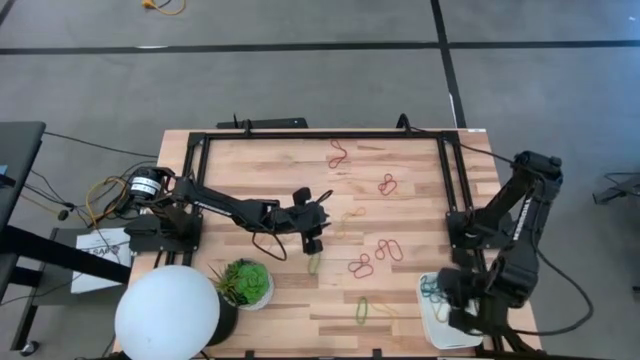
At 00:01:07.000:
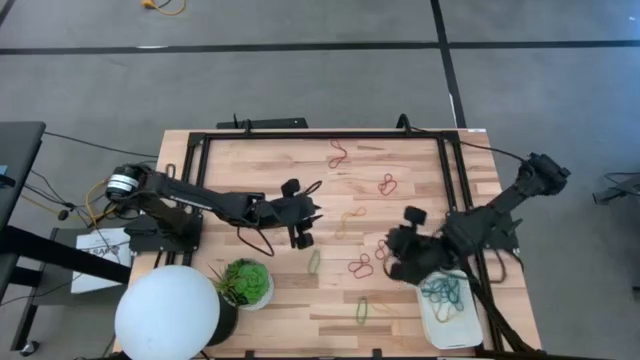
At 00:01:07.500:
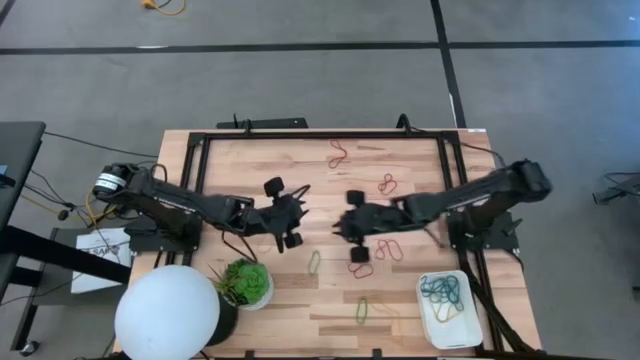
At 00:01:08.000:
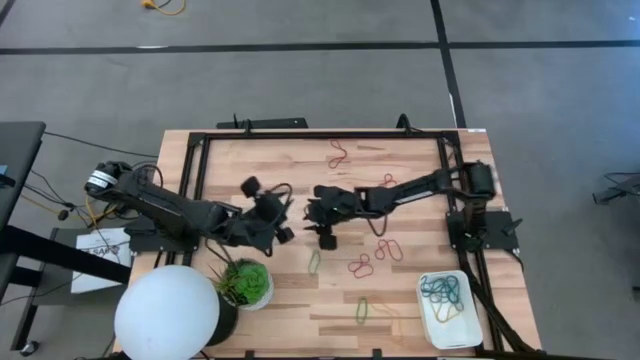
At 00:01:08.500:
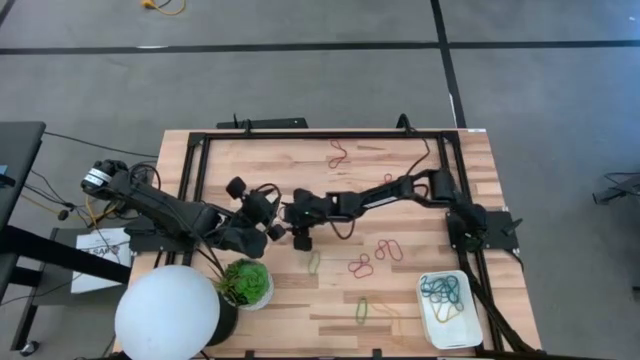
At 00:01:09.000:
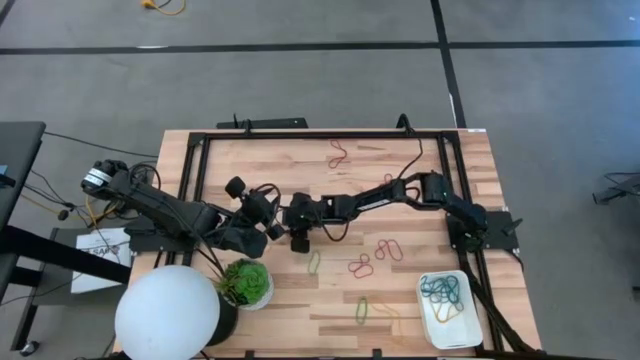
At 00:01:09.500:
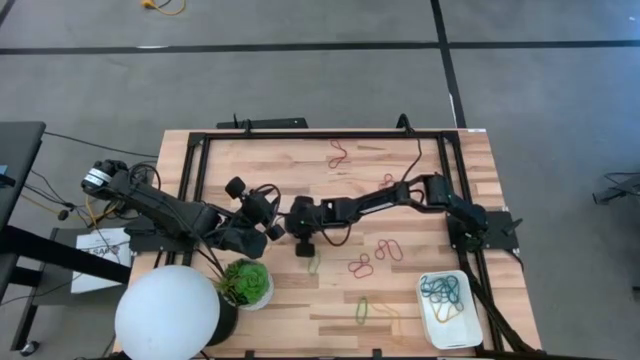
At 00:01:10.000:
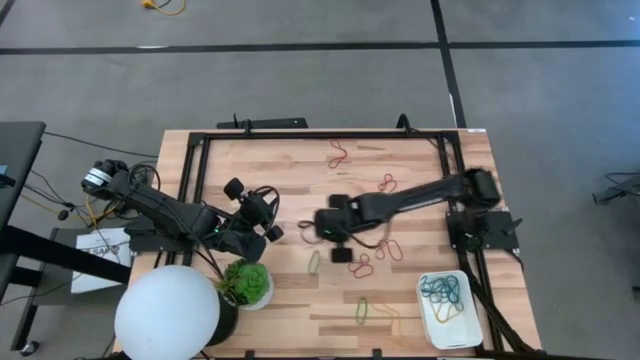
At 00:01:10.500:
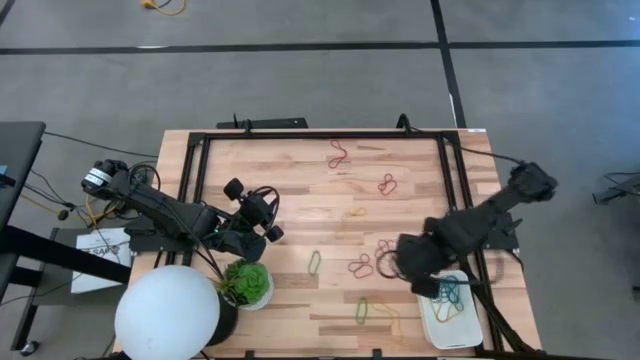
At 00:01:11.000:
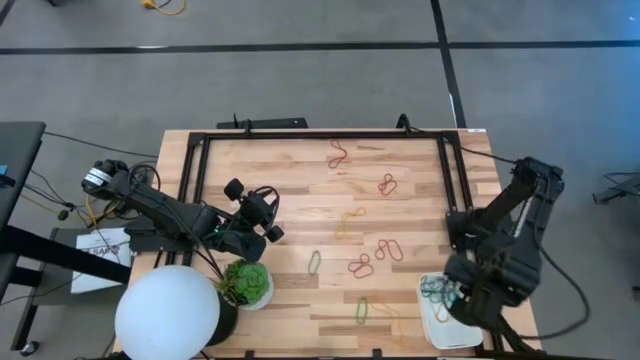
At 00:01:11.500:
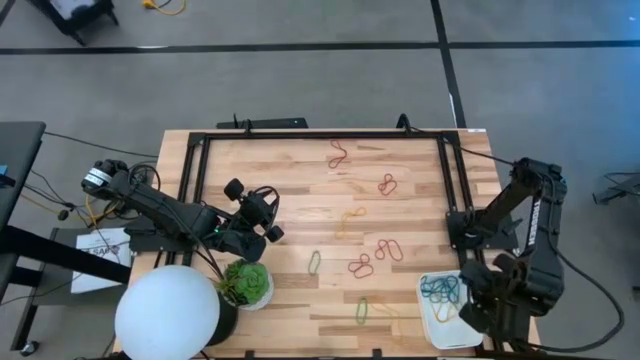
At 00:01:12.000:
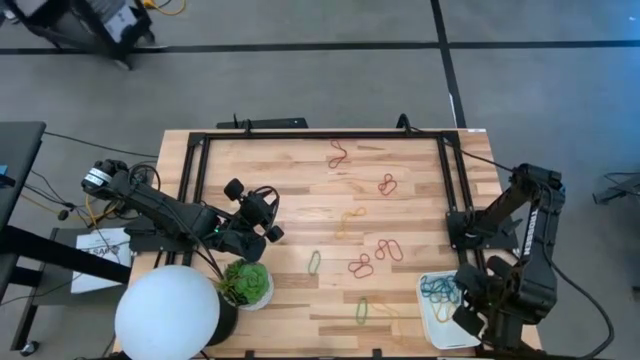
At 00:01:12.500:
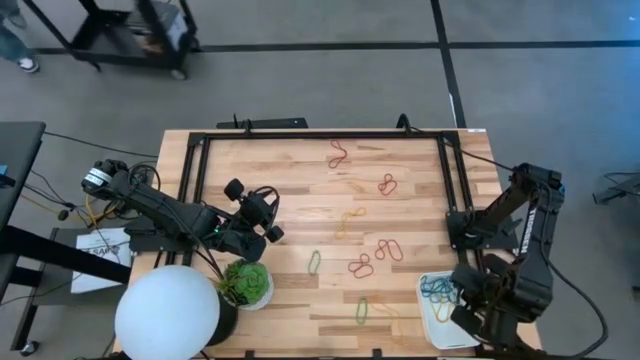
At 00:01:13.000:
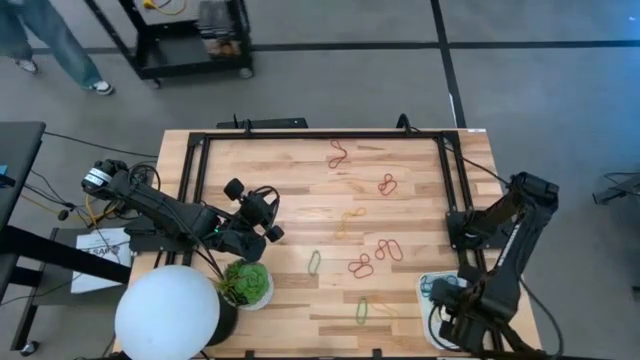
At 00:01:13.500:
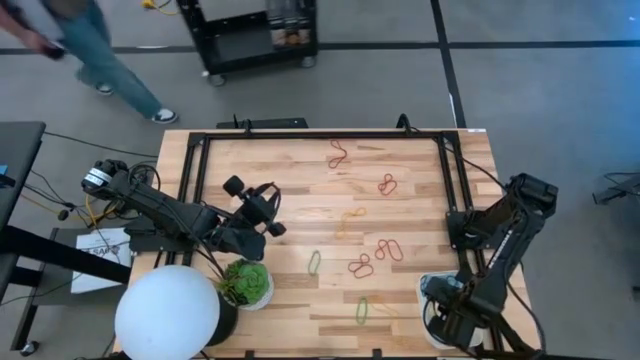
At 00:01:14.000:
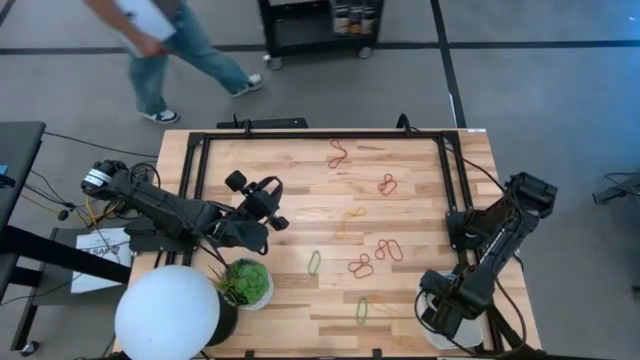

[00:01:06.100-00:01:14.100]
Task: Pick and place items into bin
Put the yellow rubber band into the white bin

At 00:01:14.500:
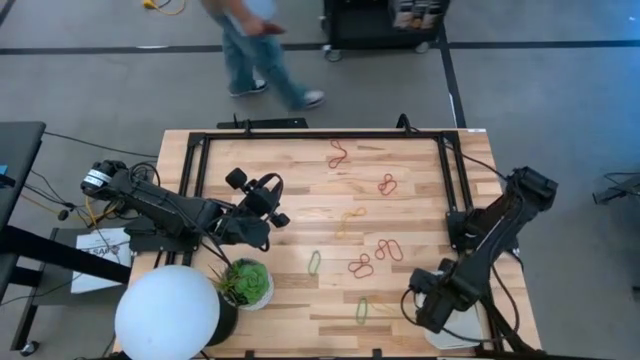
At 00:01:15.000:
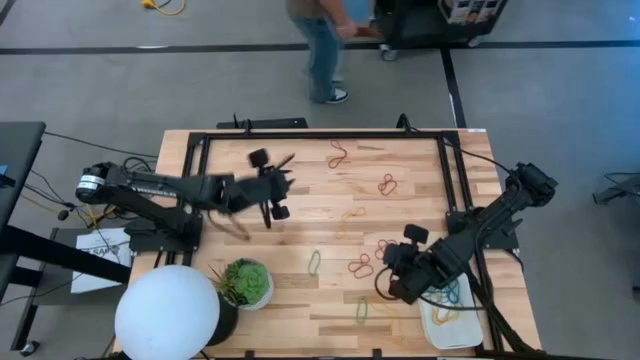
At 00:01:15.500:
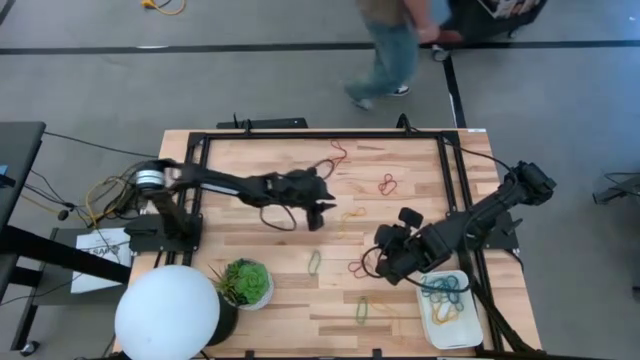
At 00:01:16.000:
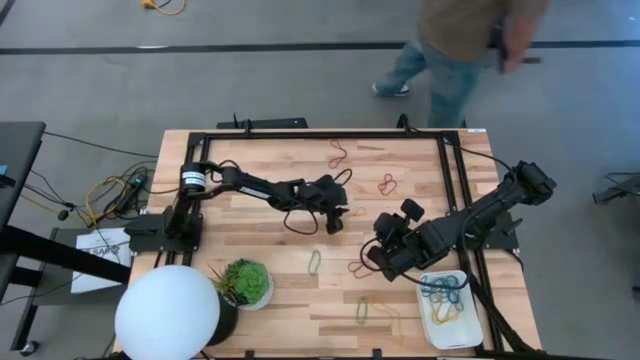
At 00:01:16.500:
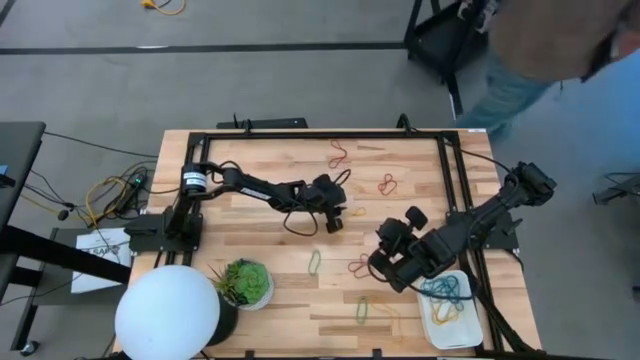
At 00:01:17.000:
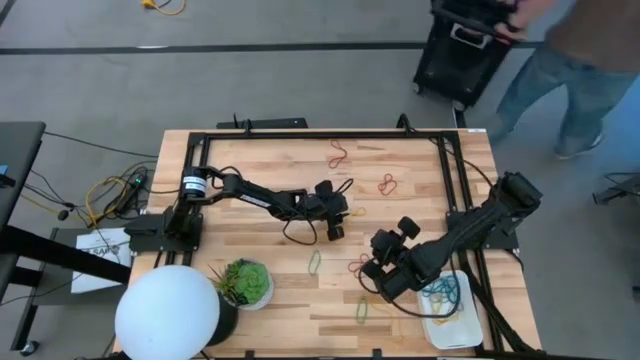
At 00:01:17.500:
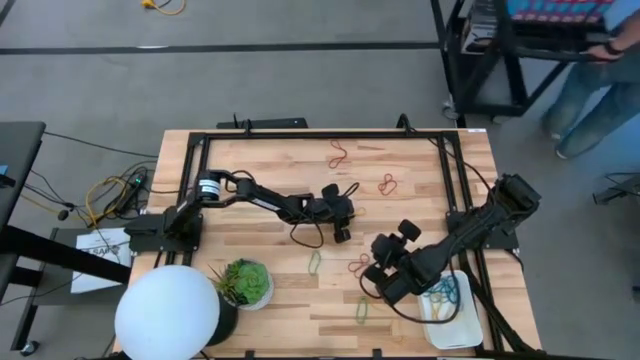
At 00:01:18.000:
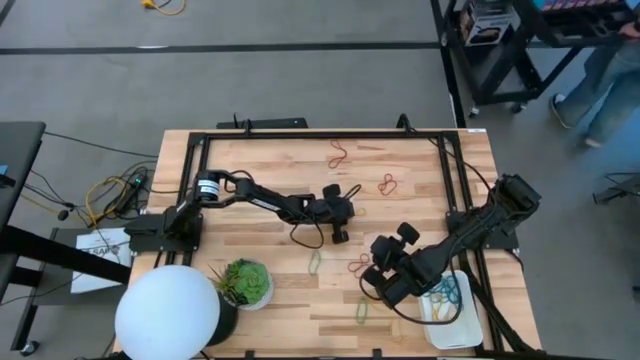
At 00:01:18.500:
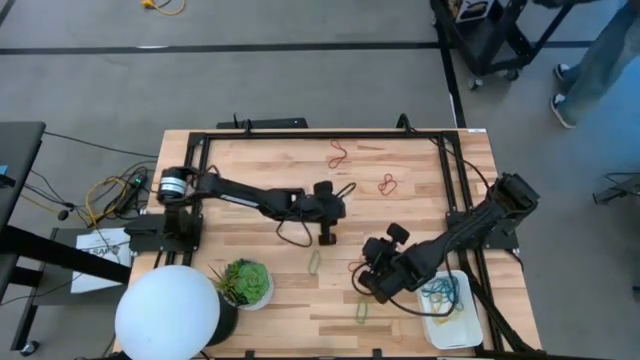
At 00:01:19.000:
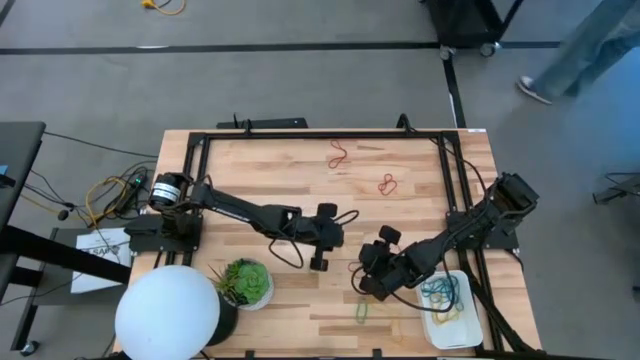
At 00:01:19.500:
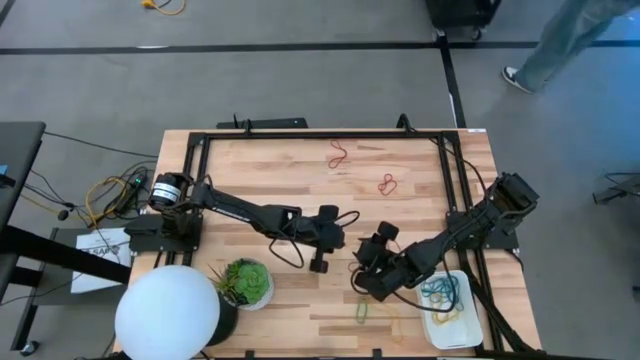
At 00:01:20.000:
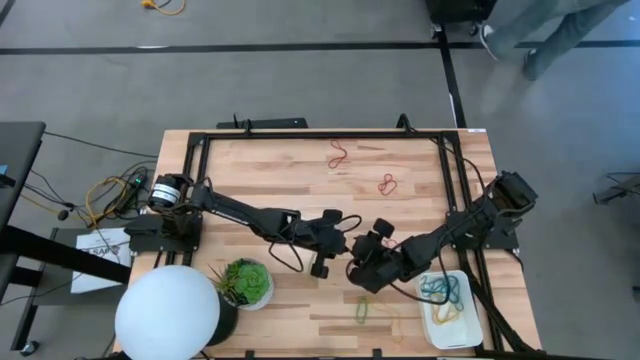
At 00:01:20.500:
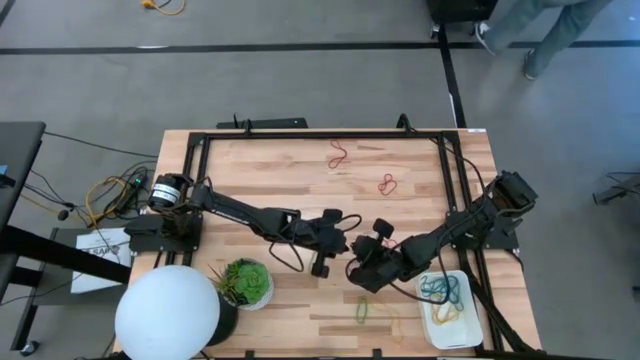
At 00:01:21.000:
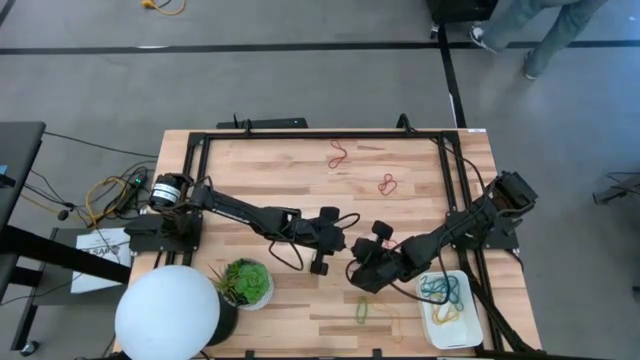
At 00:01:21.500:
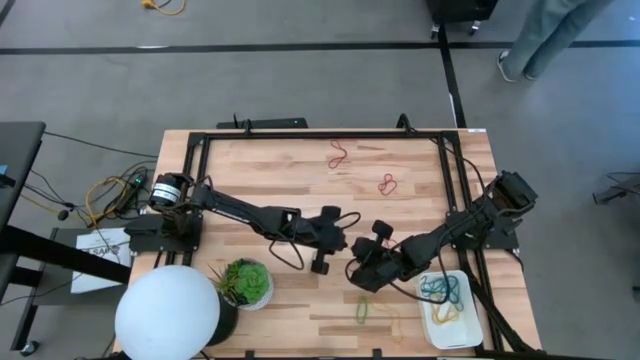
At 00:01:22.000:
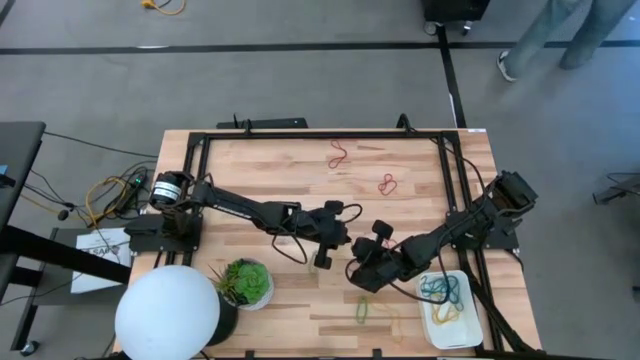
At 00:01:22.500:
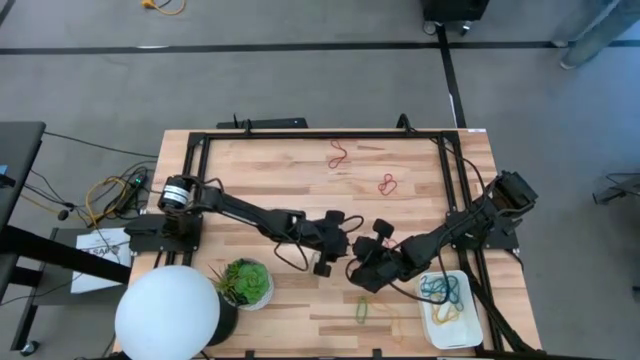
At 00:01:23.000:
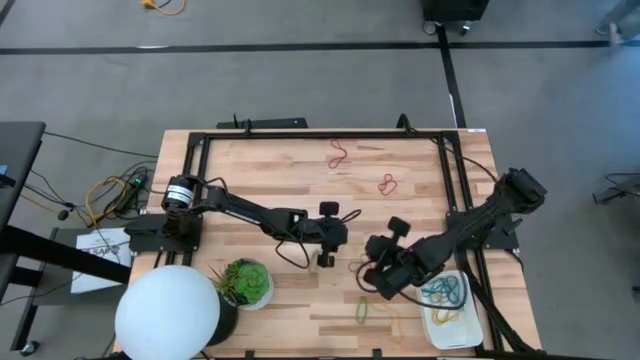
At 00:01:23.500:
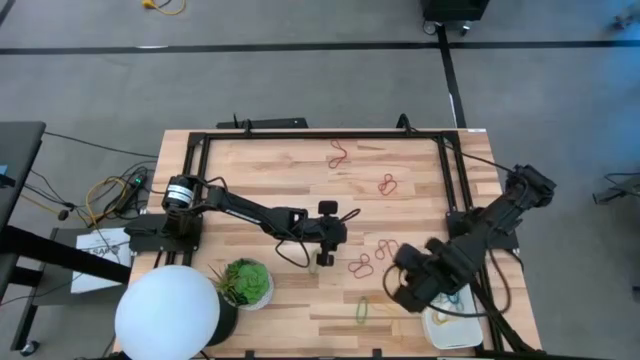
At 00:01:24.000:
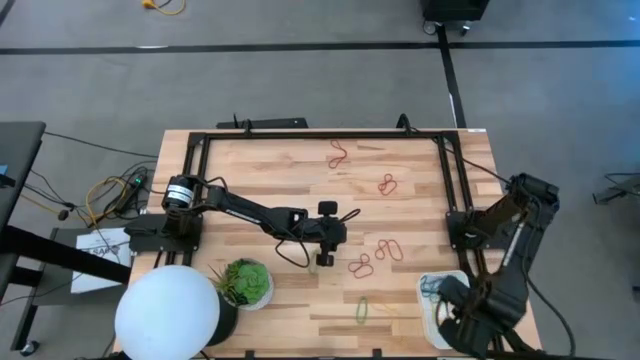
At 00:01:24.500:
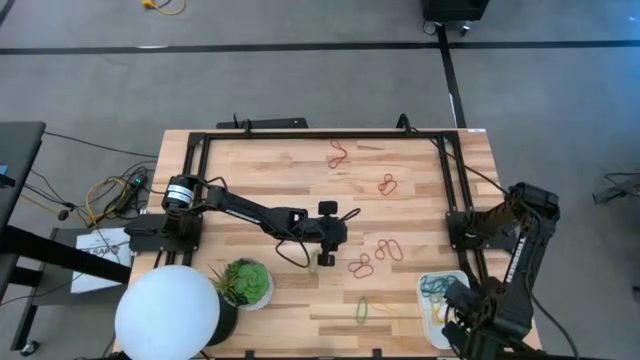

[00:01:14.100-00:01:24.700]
Put the yellow rubber band into the white bin

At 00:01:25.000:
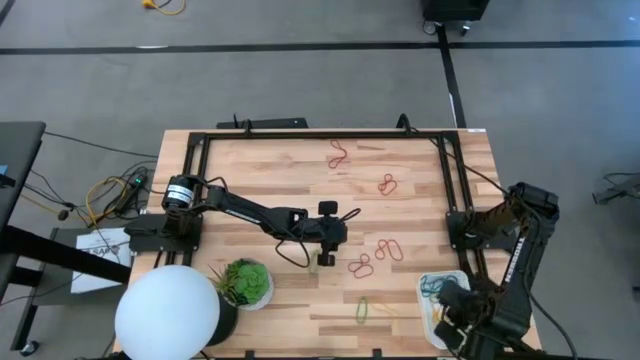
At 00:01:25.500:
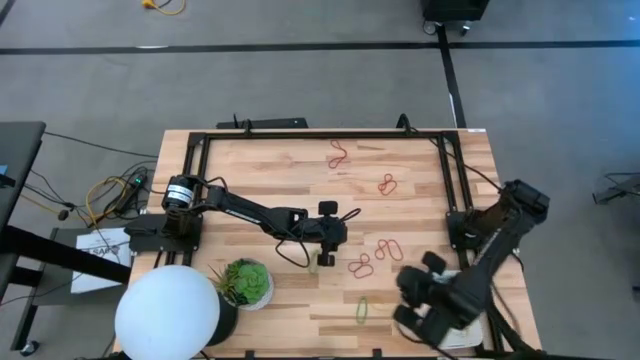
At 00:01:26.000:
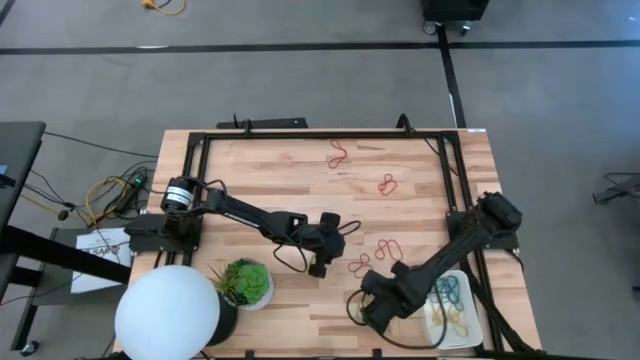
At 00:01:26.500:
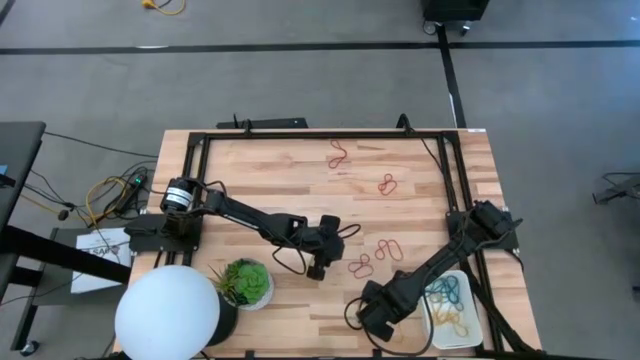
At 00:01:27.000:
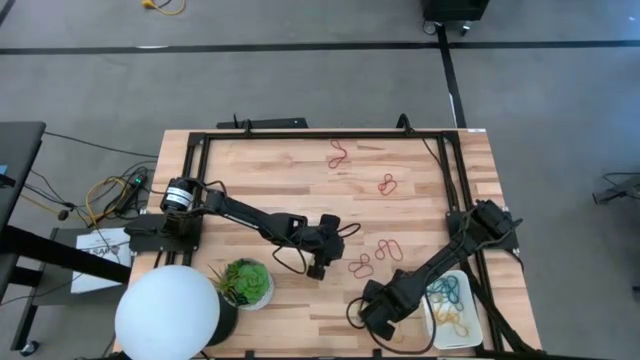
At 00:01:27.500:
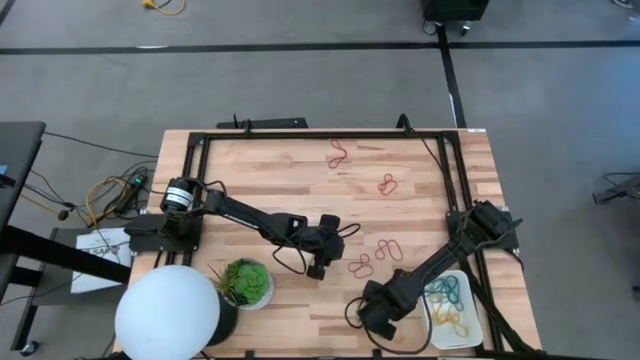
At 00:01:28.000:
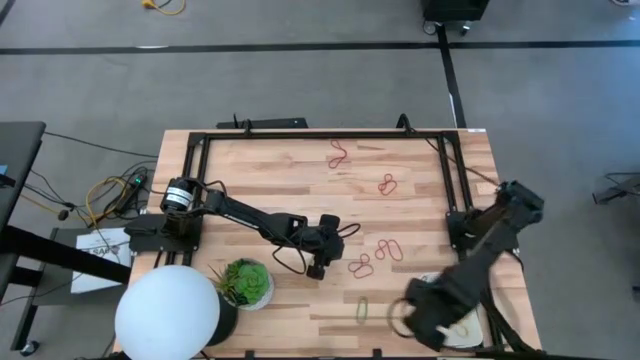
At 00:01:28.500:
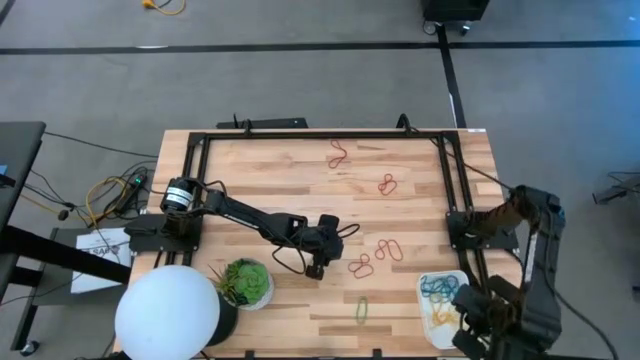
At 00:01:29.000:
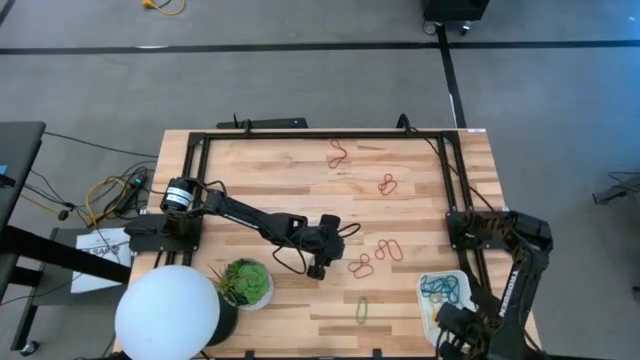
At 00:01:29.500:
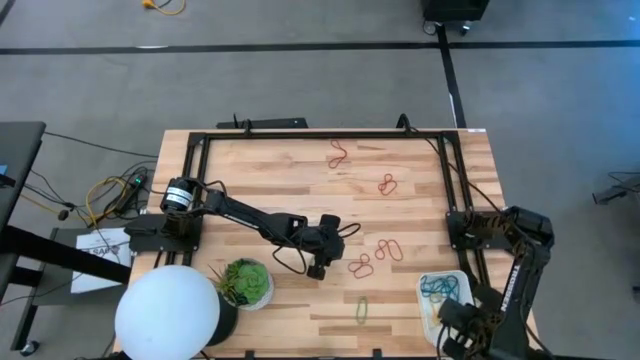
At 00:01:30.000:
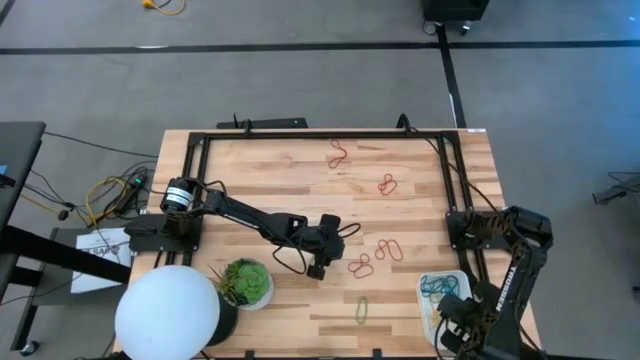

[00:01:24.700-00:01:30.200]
Put the yellow rubber band into the white bin
